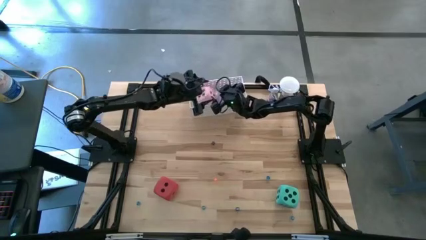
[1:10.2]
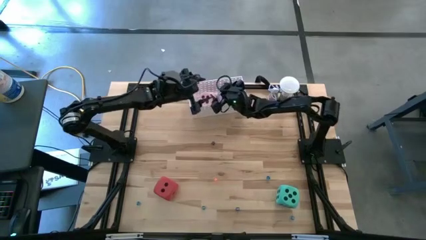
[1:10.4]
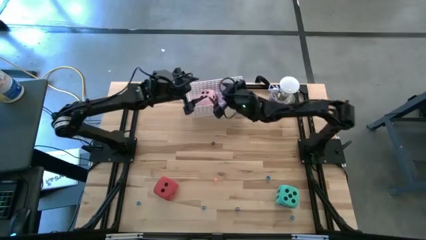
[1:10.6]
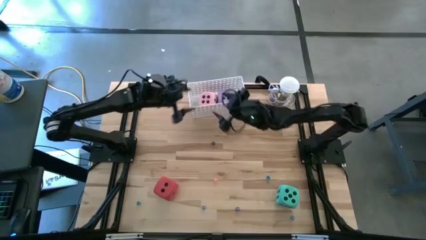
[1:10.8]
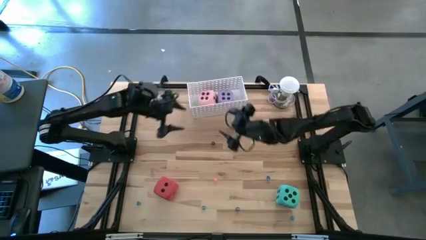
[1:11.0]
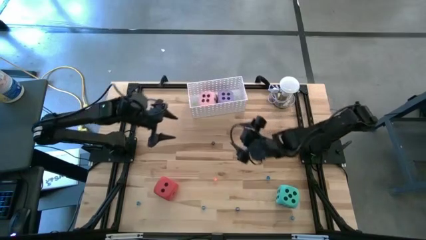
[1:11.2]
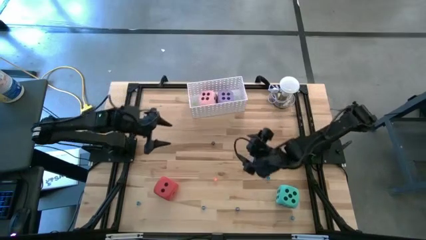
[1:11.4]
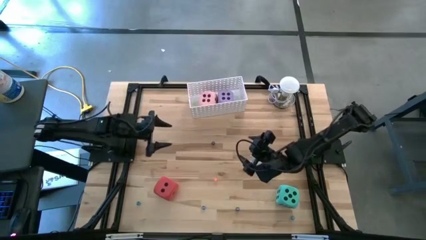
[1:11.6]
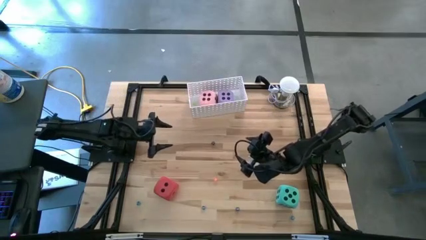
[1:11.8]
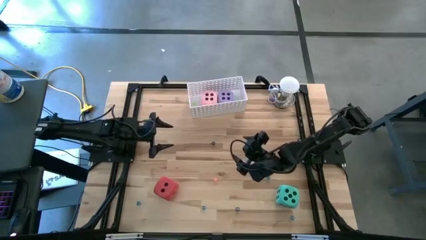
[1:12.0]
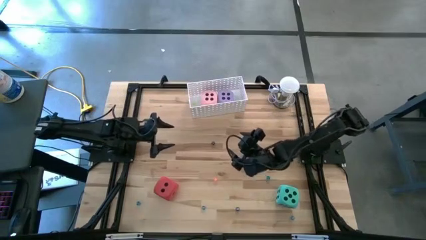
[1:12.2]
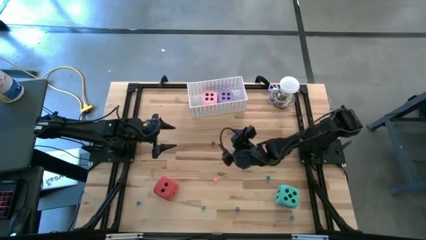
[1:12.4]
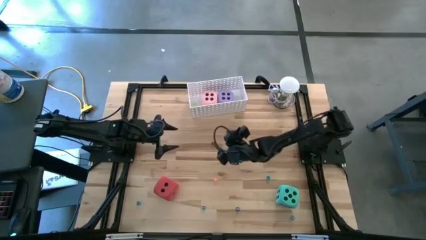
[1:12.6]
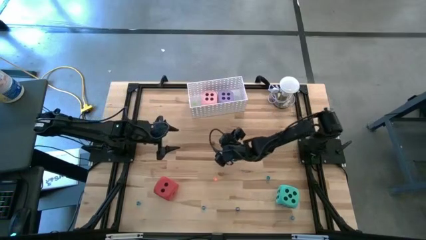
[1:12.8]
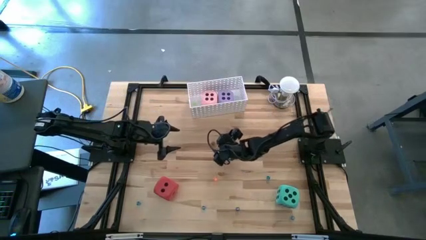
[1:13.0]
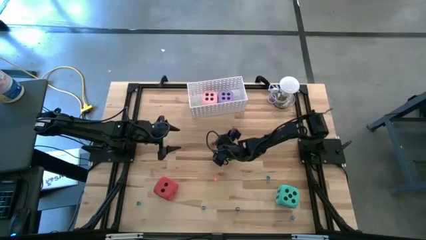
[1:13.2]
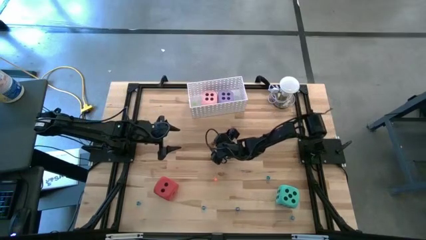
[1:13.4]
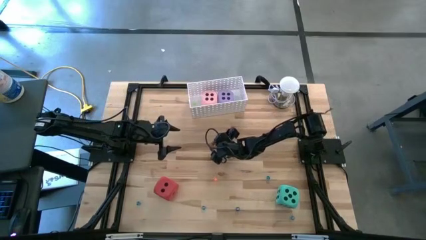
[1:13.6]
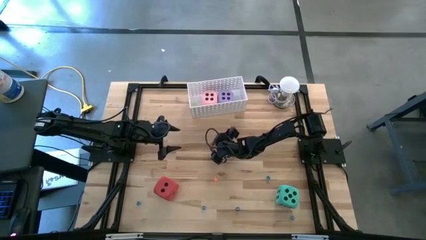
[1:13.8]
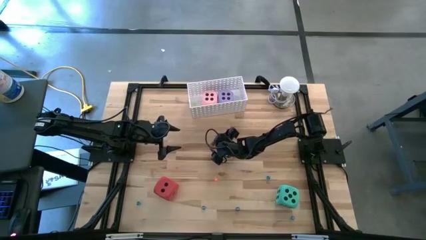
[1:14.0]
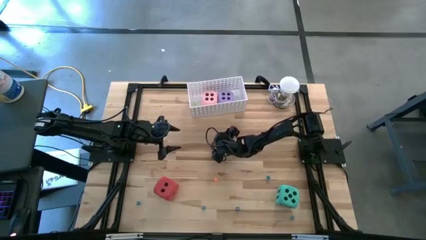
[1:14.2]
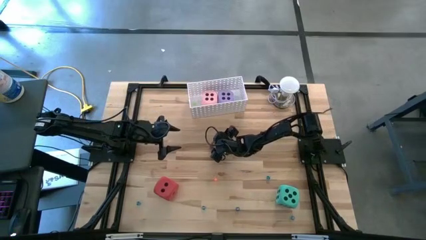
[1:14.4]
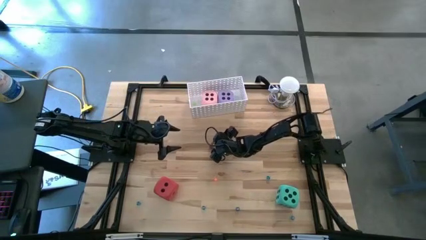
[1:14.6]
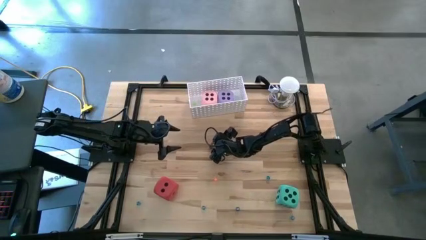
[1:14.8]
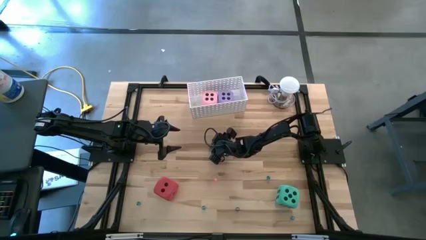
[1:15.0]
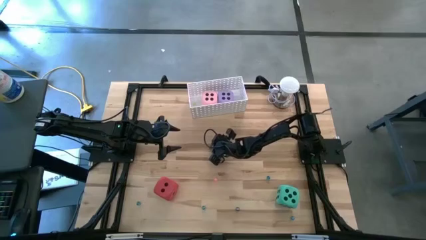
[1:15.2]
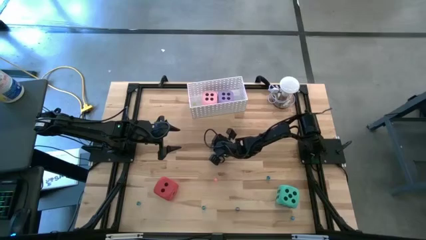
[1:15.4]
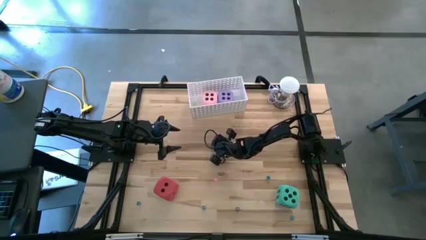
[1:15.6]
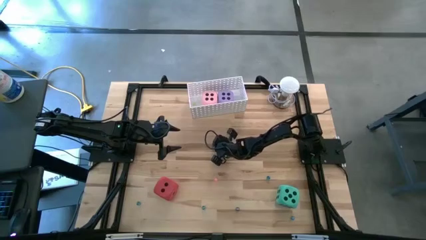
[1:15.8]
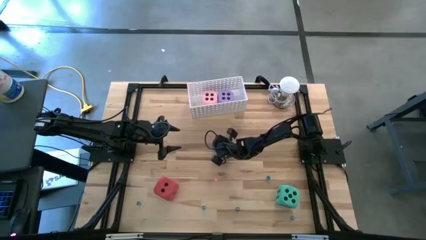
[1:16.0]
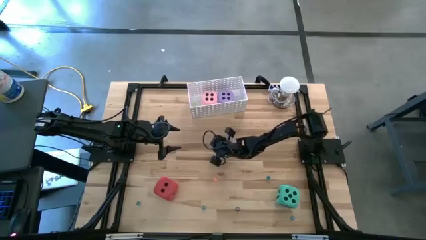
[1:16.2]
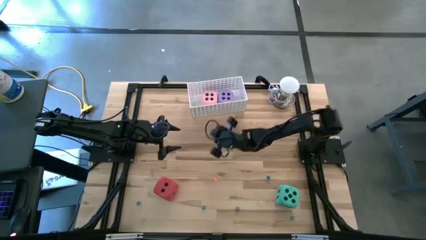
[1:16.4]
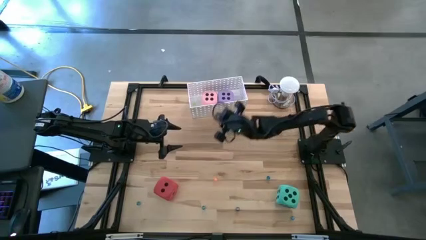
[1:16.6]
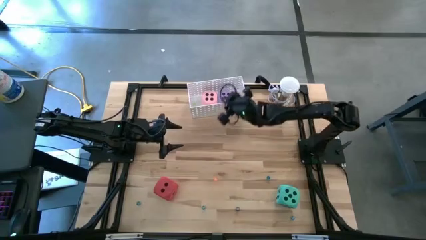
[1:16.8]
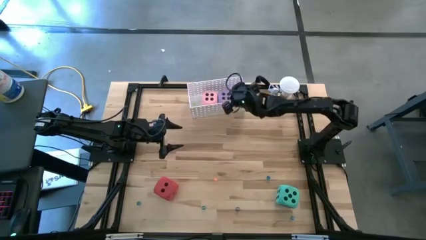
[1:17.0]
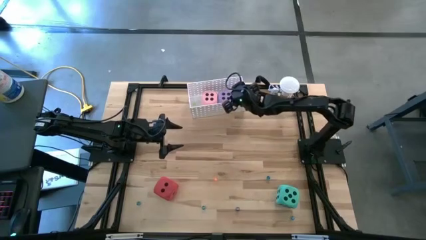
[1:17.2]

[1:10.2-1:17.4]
Task: Pick & Place Dice
Put the small black dice into the white bin

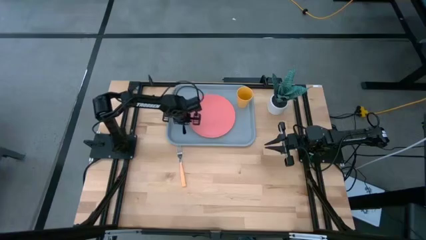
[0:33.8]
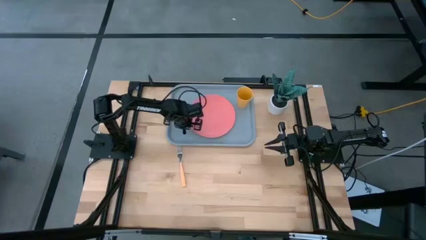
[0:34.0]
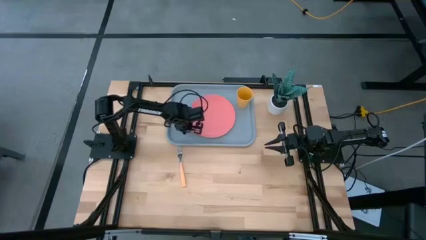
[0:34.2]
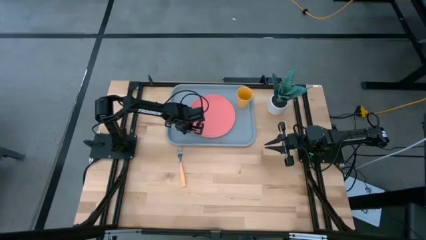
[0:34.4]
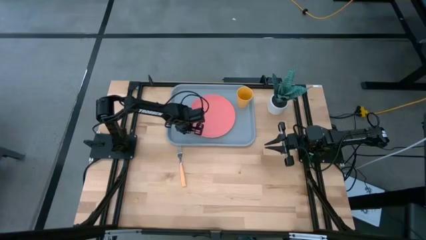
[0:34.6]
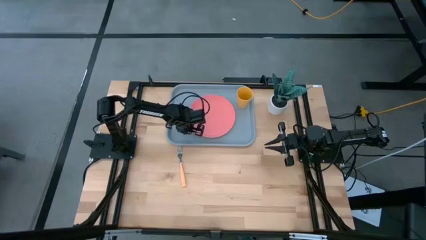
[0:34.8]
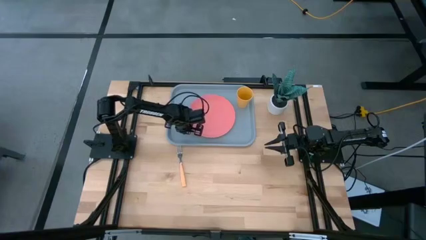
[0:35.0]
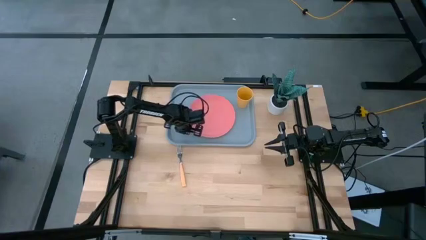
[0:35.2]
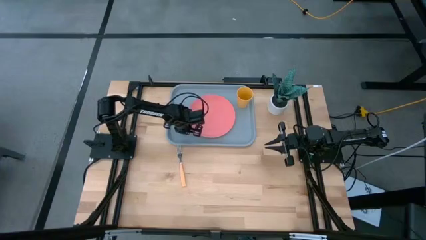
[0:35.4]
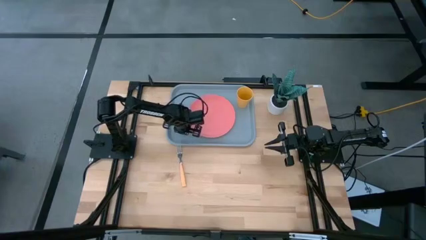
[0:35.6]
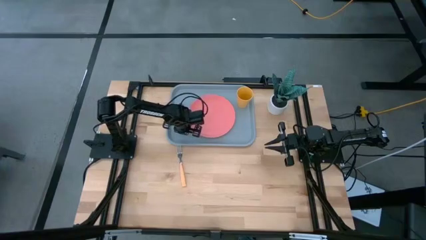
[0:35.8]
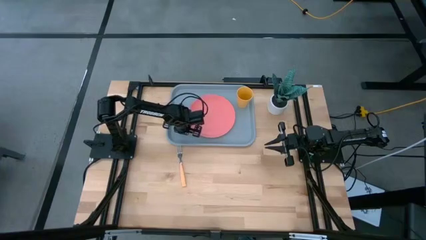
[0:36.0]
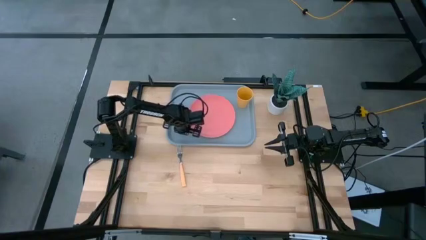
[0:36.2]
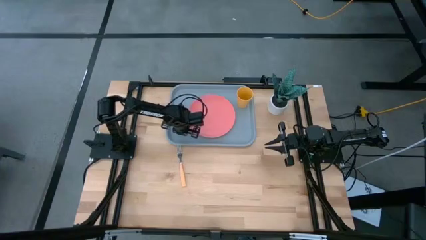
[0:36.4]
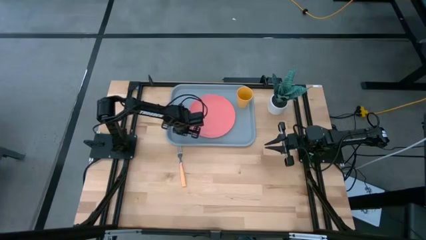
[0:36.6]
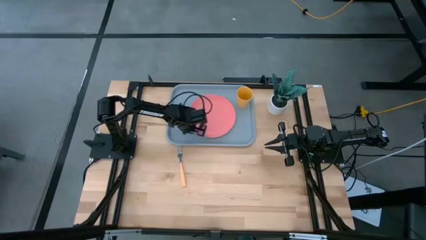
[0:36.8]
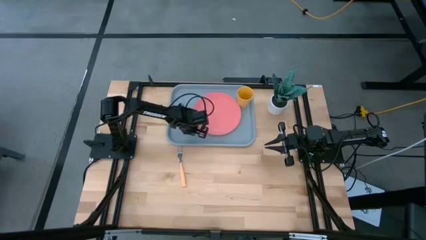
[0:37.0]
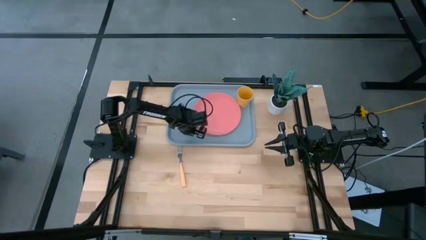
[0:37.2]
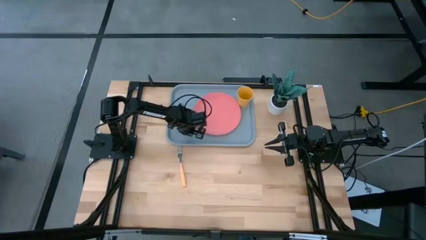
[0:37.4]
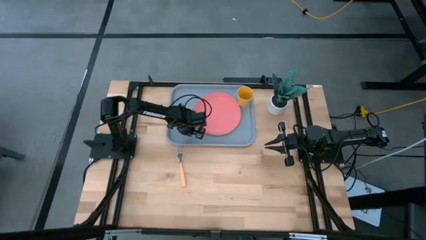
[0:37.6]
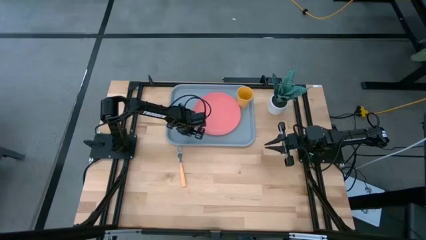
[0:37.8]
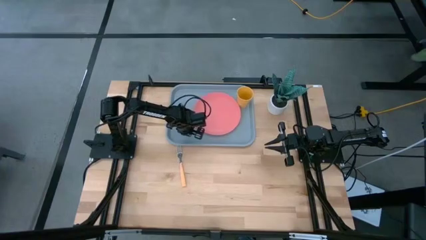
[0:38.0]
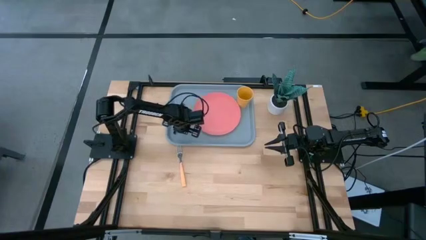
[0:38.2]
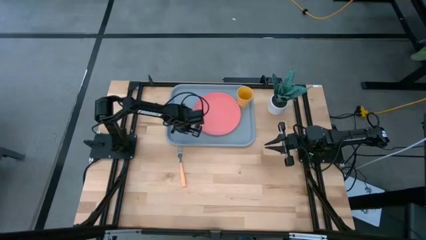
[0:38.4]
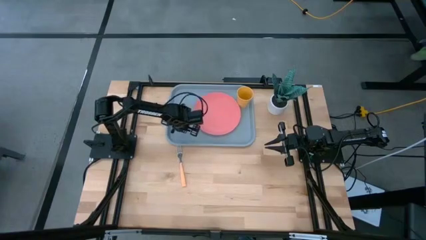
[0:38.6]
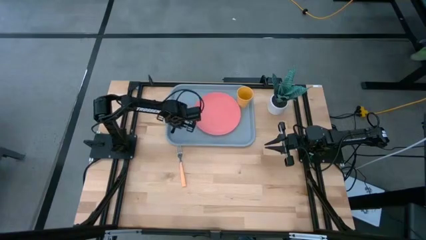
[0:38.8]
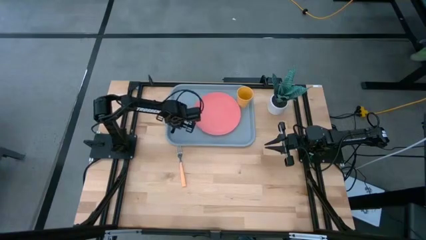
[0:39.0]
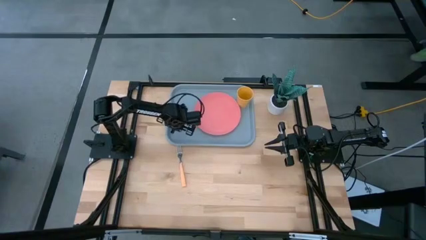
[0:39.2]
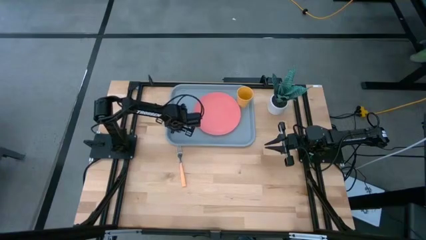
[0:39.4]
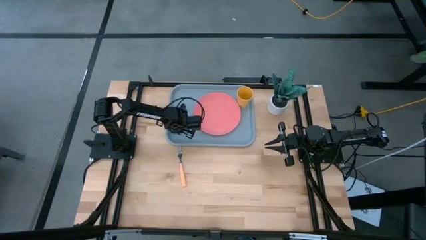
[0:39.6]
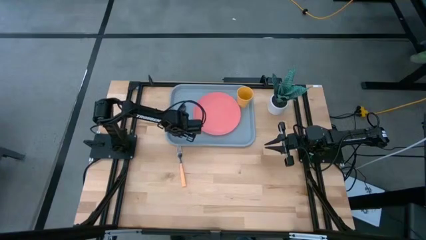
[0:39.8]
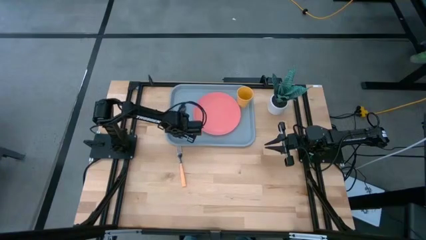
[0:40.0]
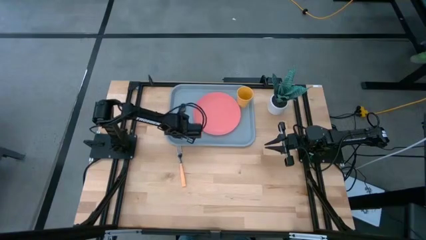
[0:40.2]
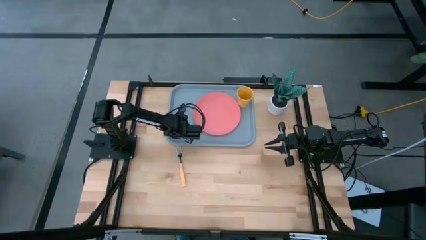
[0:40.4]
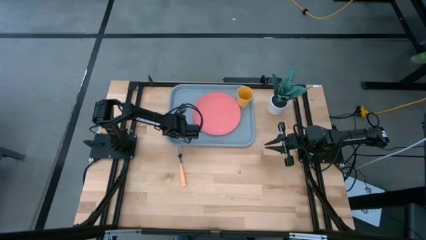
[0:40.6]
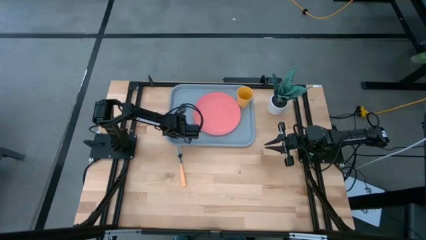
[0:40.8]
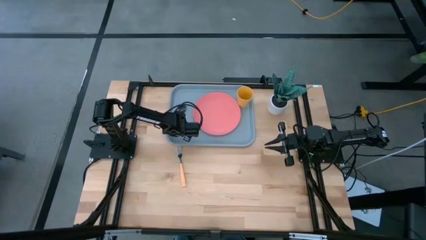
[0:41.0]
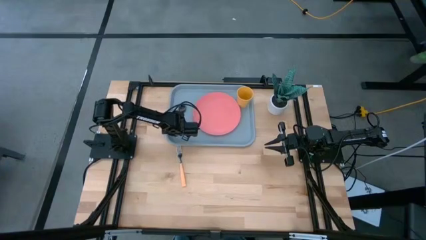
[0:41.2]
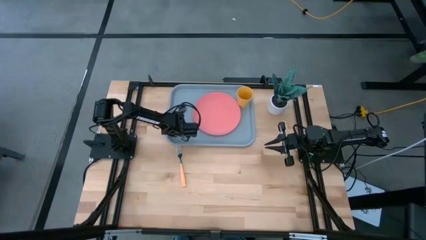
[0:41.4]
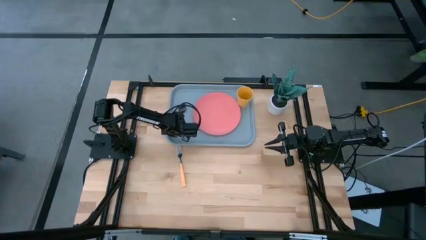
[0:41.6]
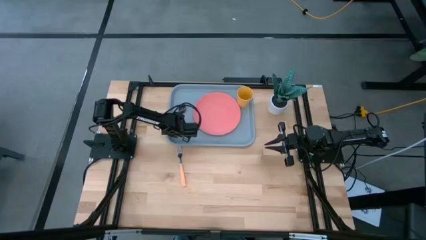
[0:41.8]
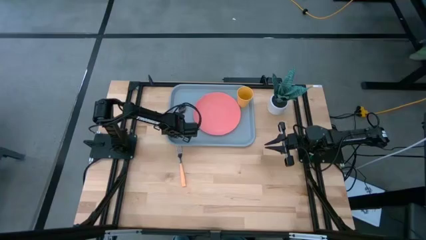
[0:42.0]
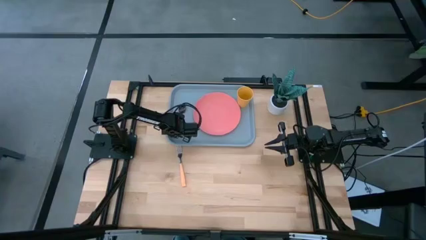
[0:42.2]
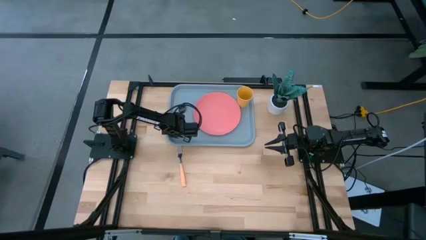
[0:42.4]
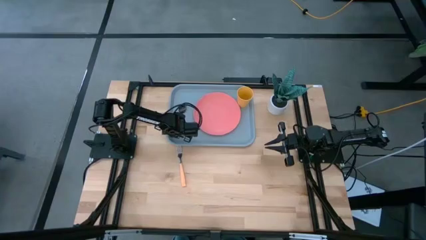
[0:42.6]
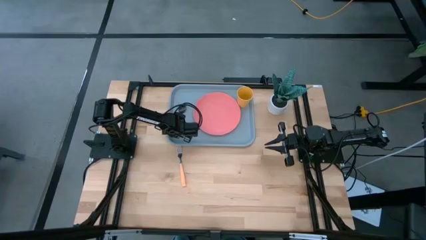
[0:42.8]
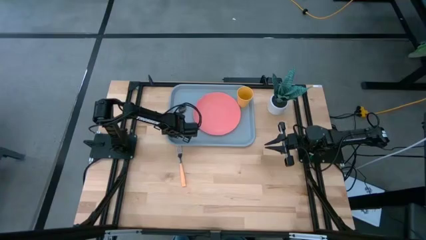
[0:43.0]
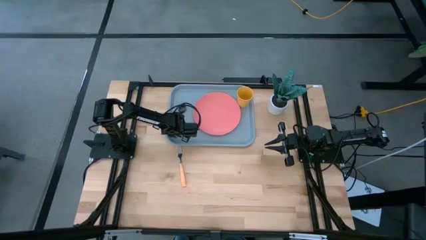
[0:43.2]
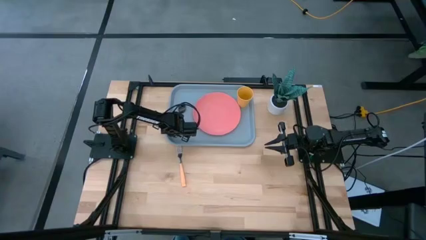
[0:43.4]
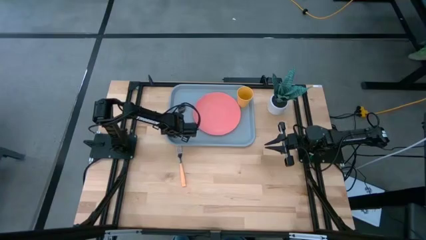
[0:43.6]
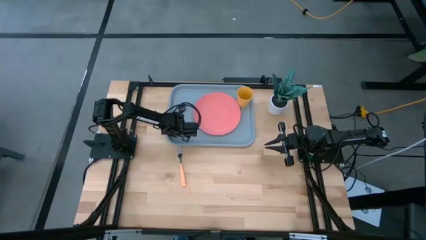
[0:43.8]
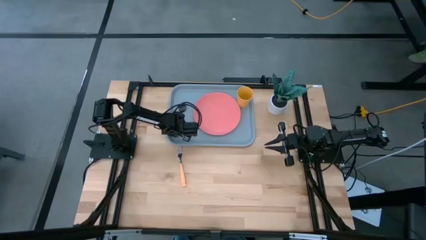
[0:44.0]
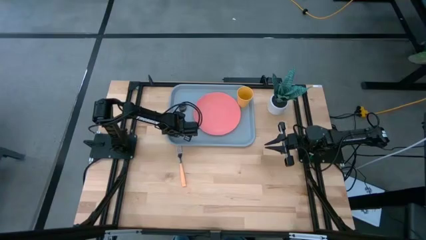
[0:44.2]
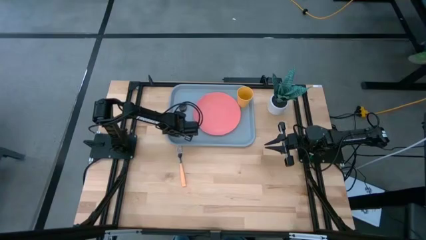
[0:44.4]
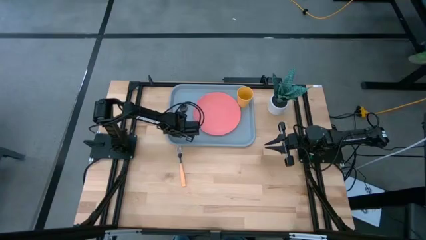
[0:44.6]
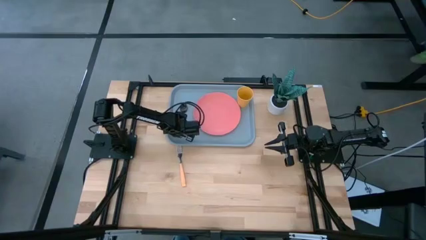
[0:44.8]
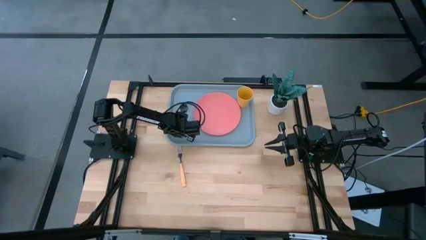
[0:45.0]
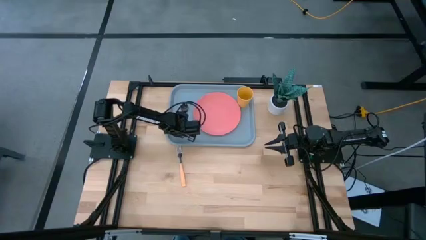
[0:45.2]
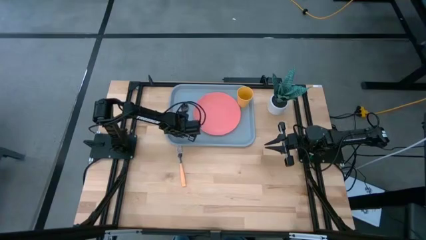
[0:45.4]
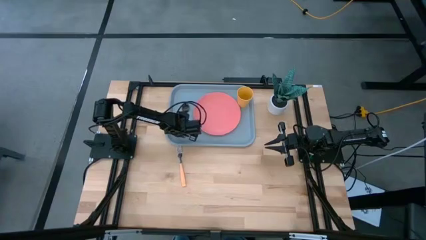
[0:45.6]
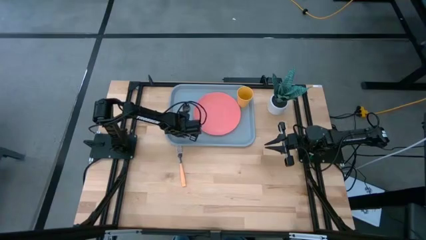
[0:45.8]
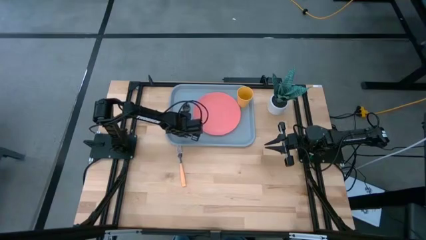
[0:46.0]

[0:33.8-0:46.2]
Task: Pick and place plate/cup/fork/spoon on tray
Put the black spoon on the blue tray to the left of the pink plate
